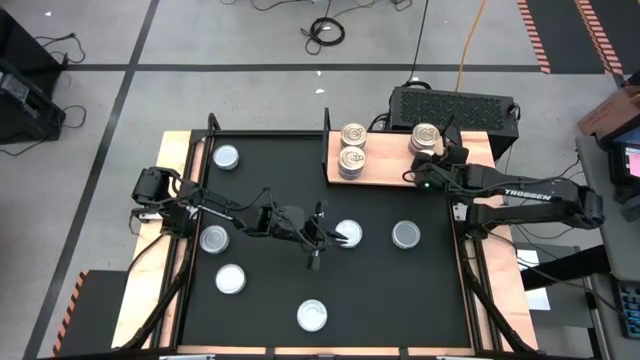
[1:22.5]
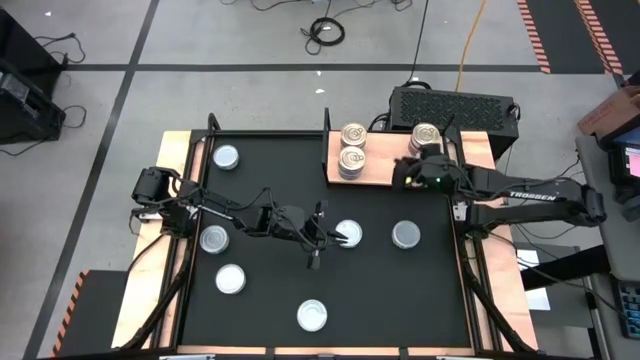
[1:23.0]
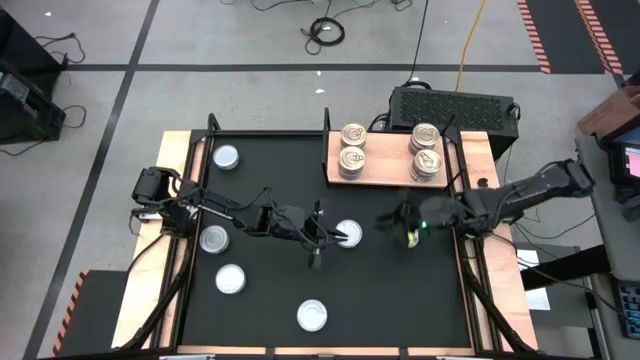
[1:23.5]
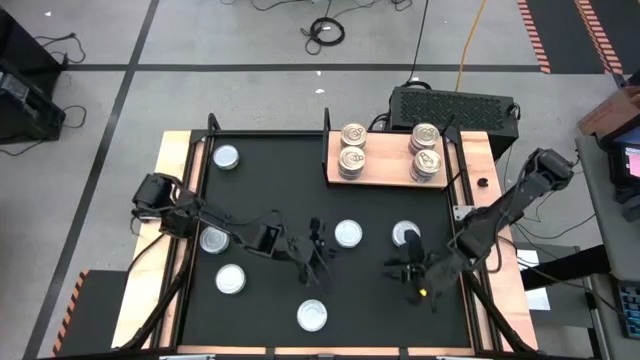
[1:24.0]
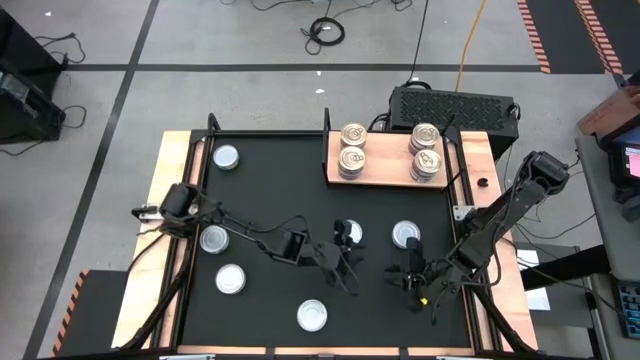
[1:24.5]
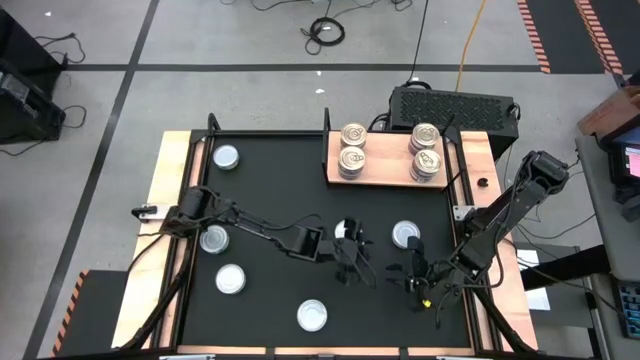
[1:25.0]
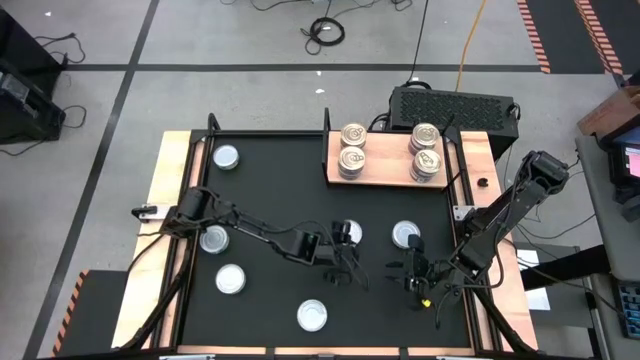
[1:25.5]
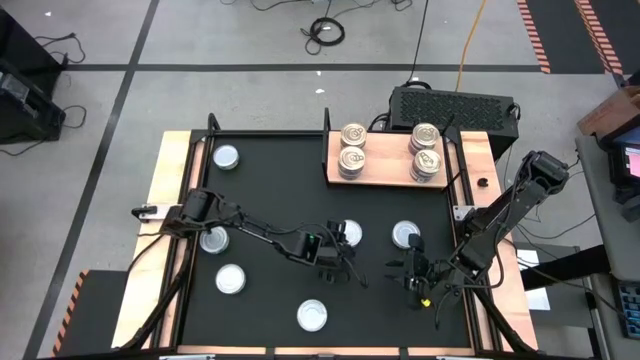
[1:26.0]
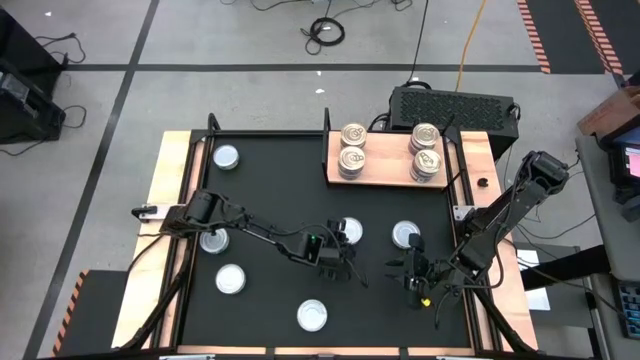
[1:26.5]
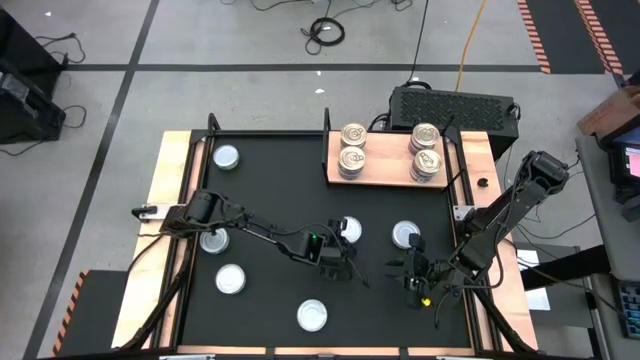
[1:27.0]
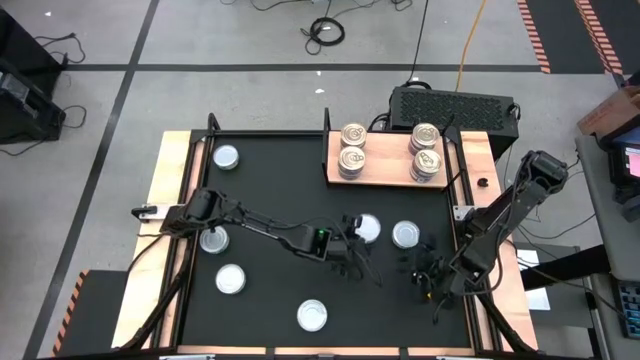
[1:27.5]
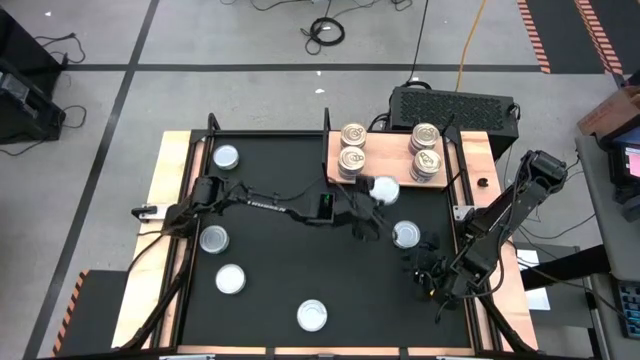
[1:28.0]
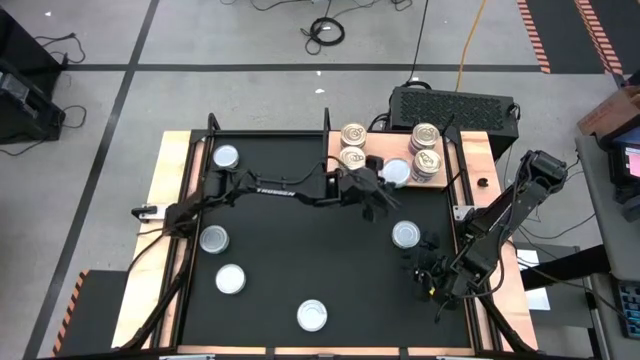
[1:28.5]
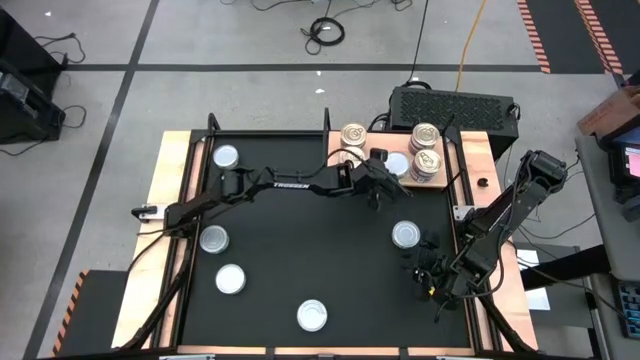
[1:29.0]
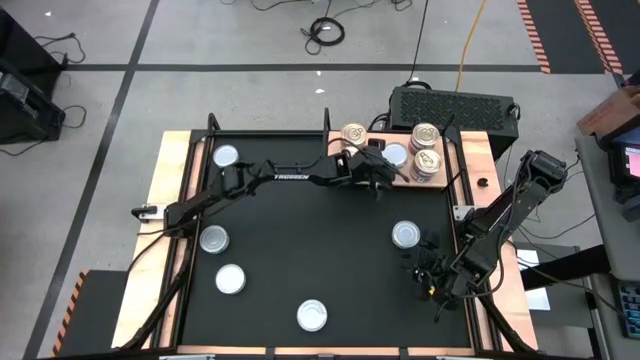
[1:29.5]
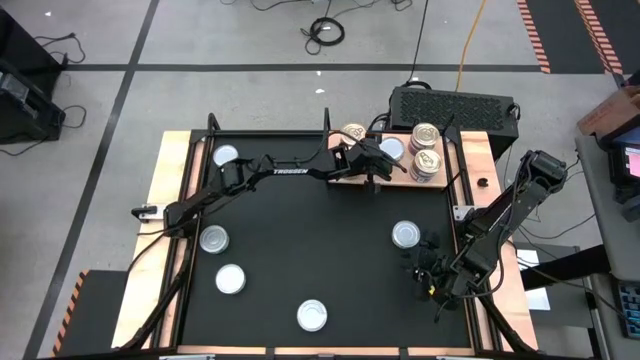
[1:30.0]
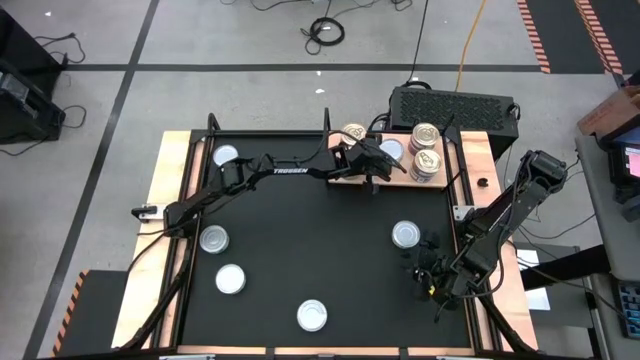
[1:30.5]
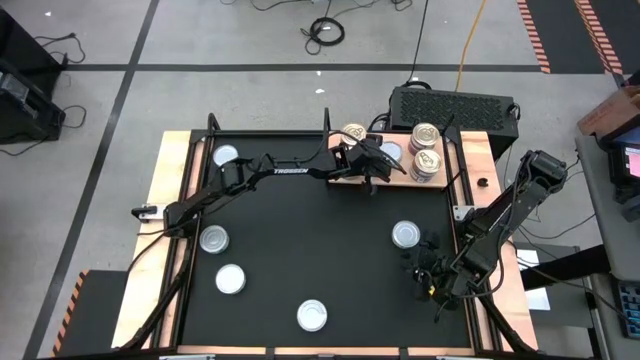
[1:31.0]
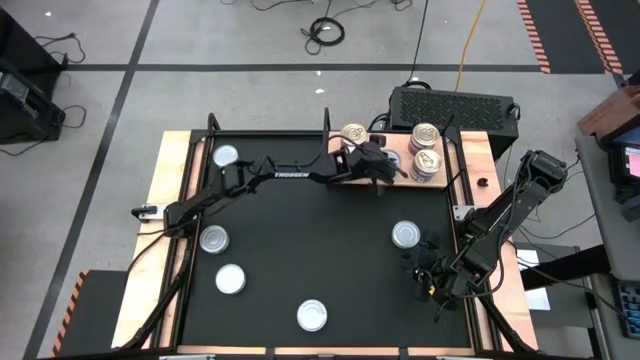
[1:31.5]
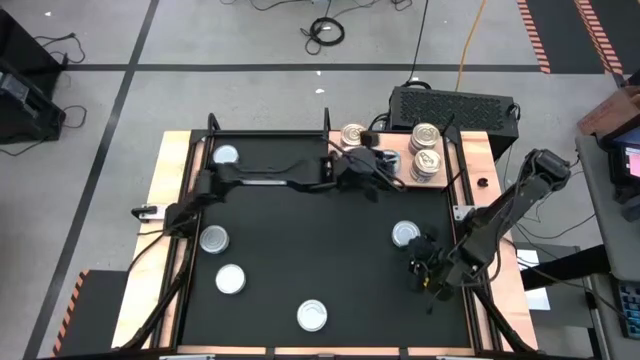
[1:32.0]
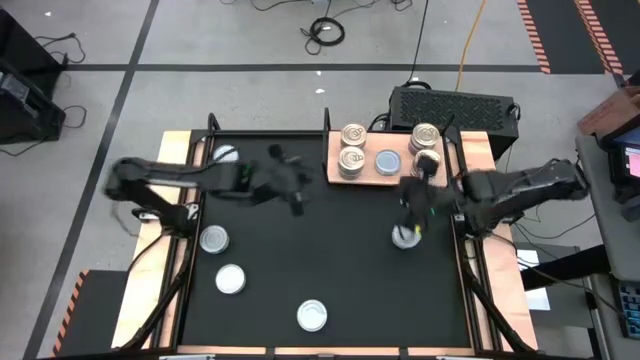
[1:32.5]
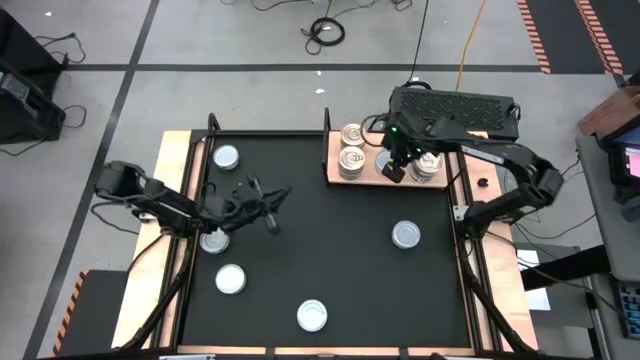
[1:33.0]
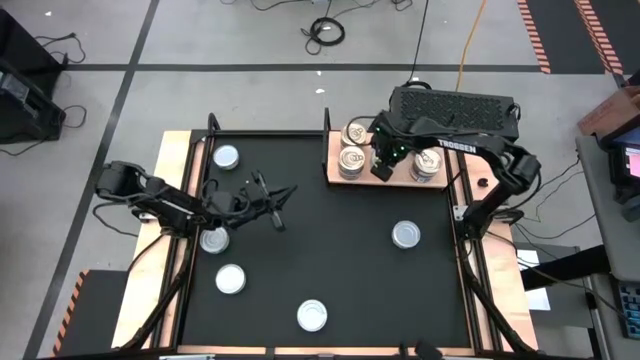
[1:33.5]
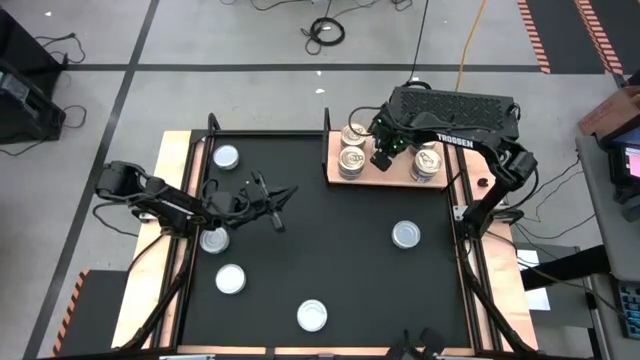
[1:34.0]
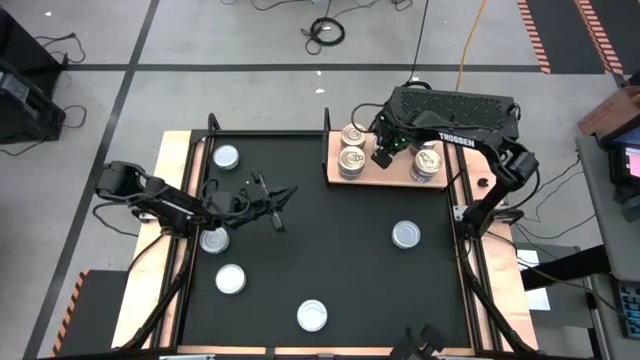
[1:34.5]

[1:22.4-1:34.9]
Task: Stack canned seafood by type on shelf
Put the green tuna can on the shelf

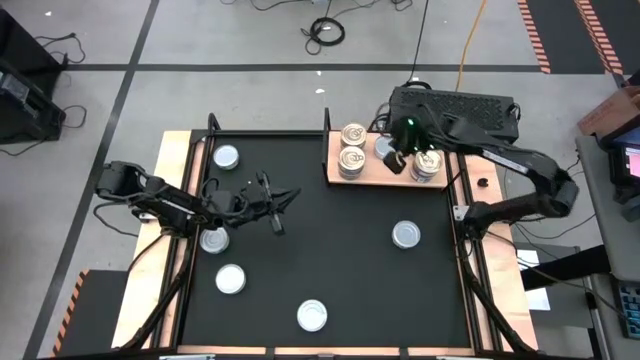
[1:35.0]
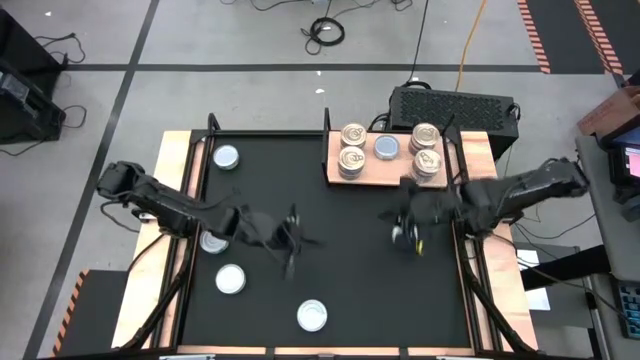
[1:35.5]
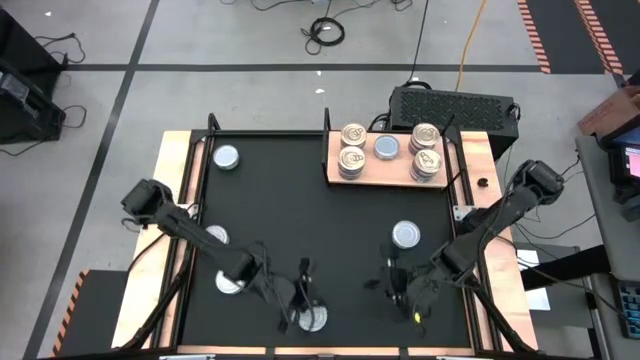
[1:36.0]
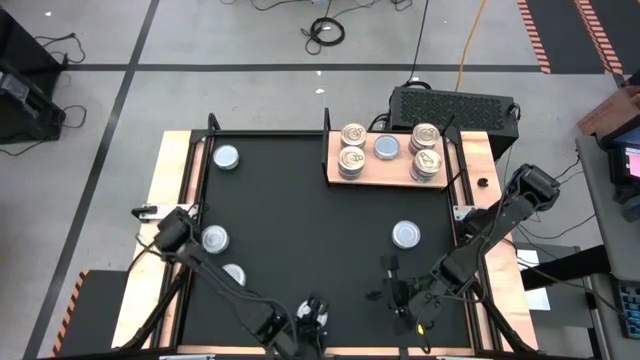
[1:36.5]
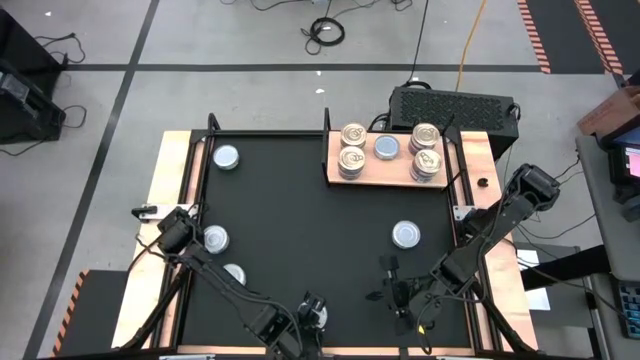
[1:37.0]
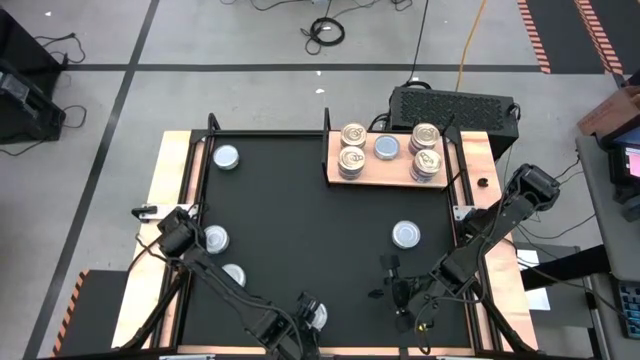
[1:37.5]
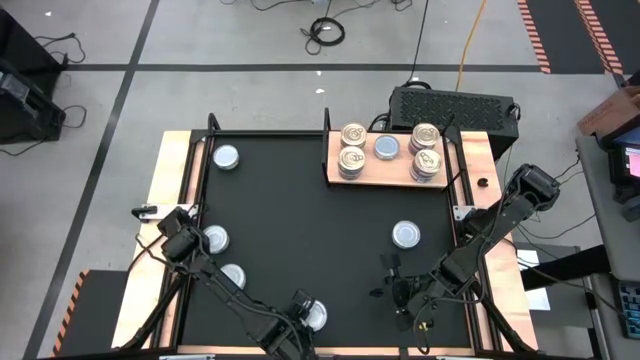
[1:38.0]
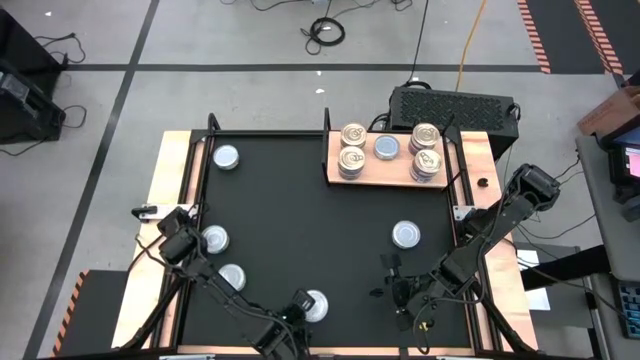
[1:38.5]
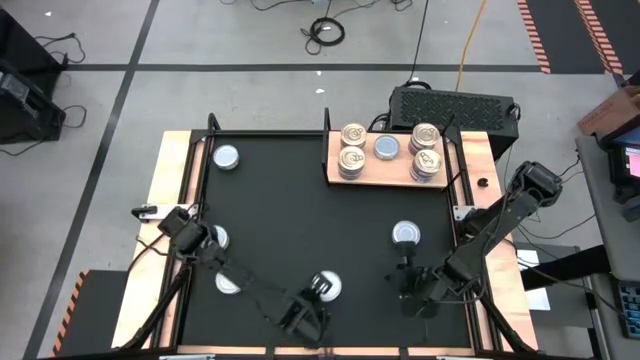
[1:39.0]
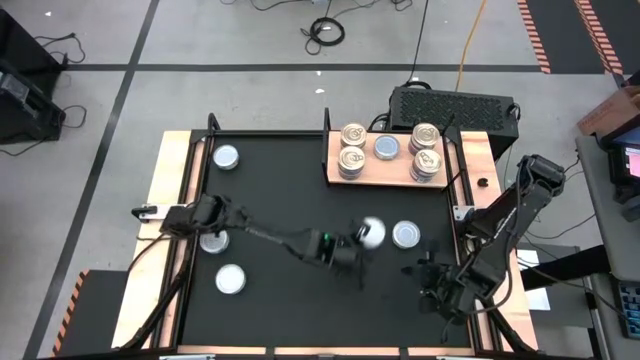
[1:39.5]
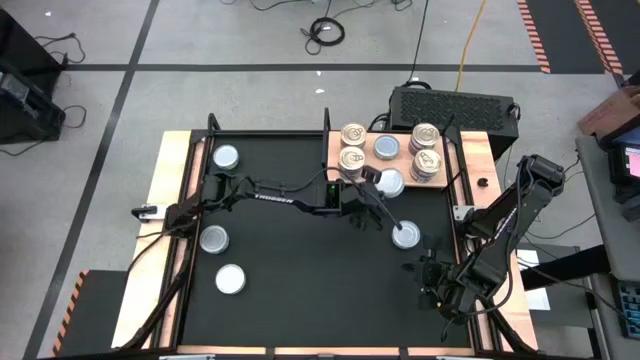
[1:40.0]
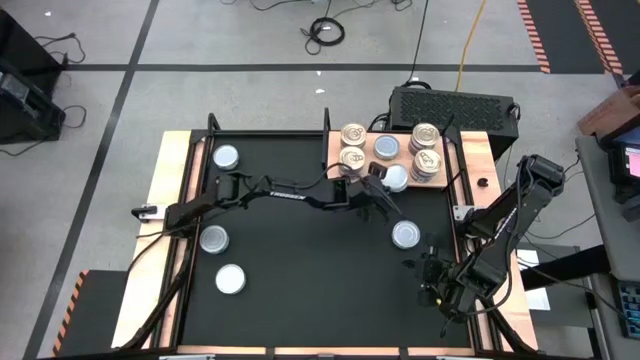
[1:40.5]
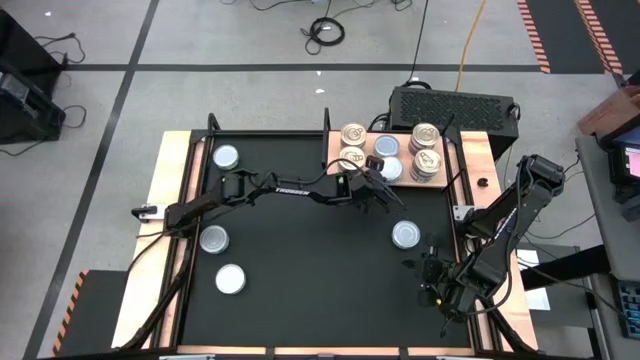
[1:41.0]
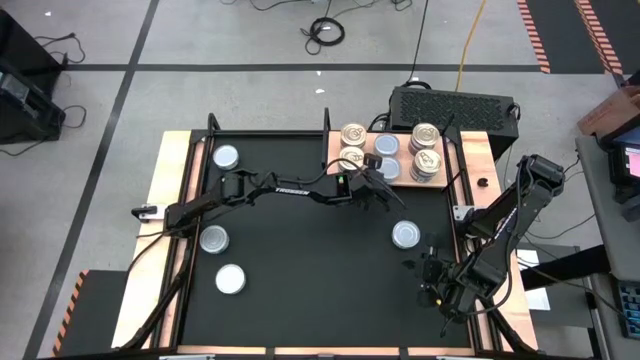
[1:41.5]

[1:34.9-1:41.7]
Put the green tuna can aligned with the other green tuna can on the shelf

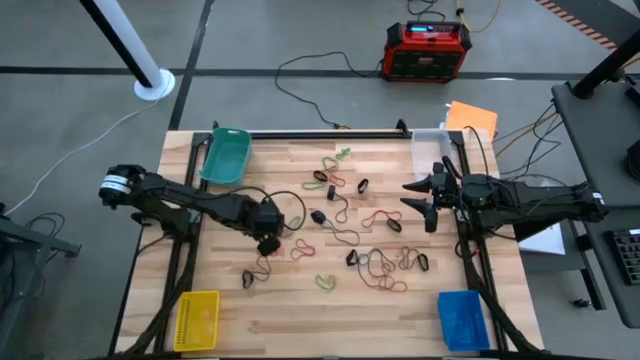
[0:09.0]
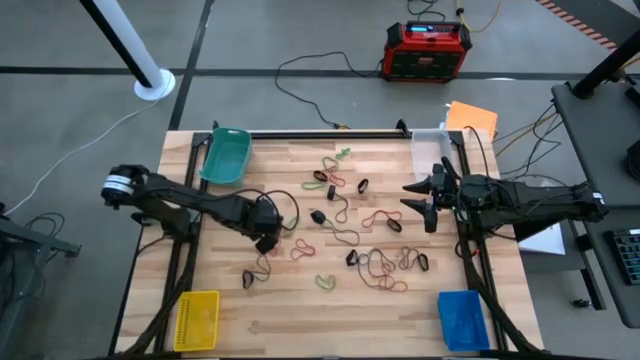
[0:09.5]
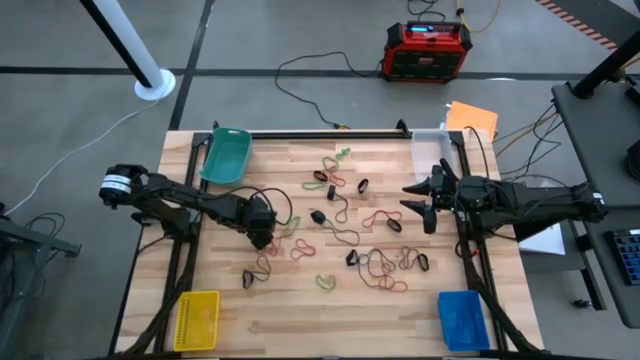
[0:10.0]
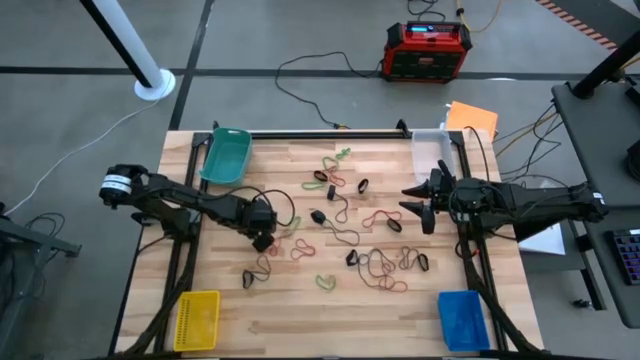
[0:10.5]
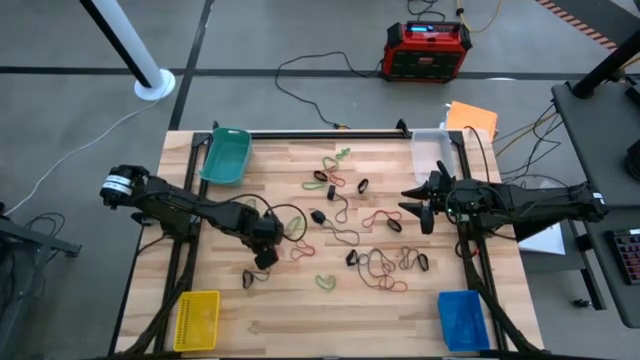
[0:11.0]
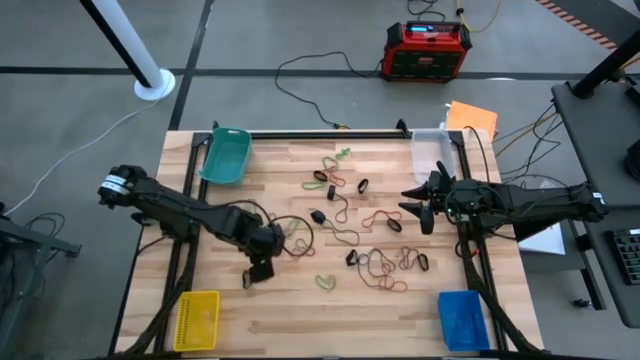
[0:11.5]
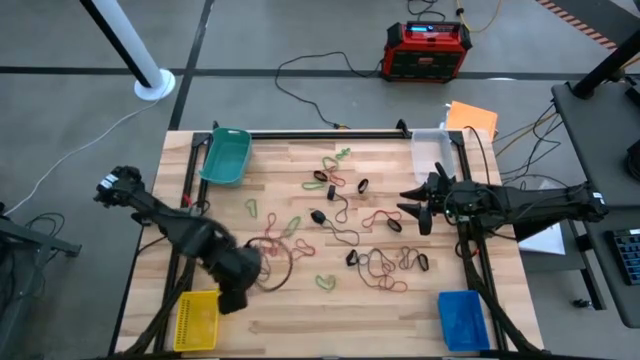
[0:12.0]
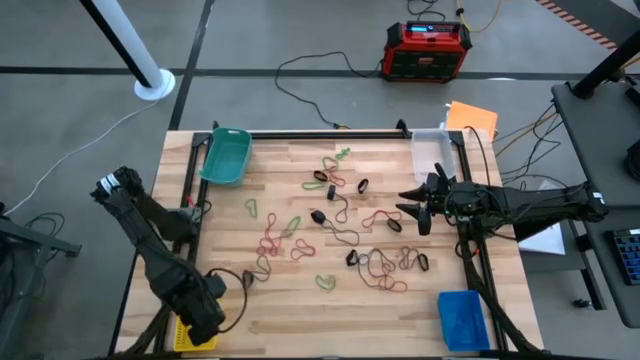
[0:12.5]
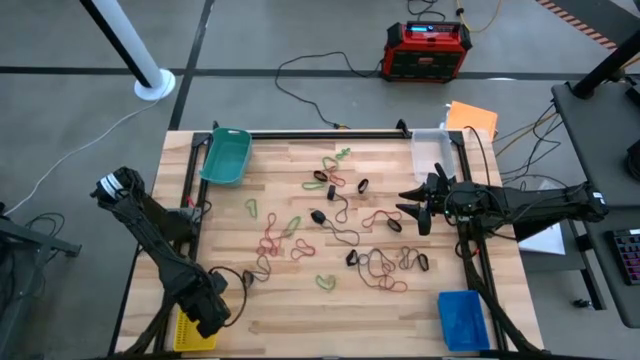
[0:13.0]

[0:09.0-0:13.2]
Task: Sort rubber bands into baskets
Put the green rubber band into the yellow bin
